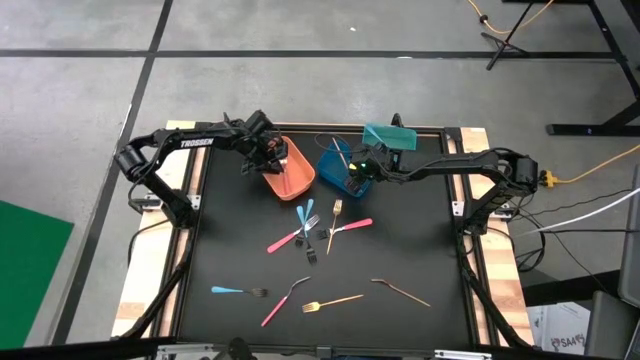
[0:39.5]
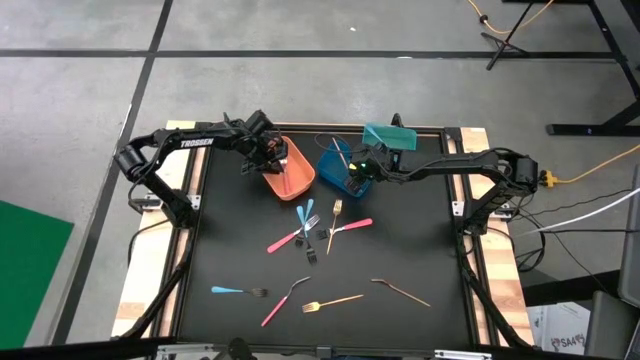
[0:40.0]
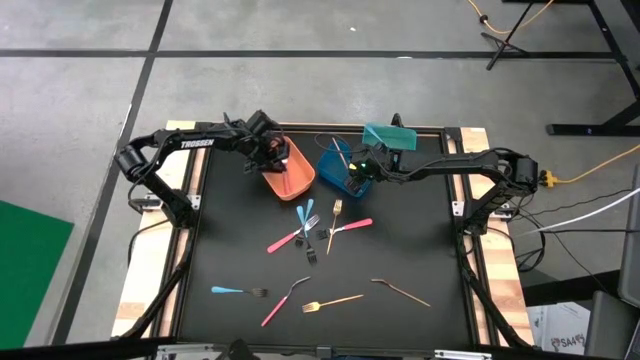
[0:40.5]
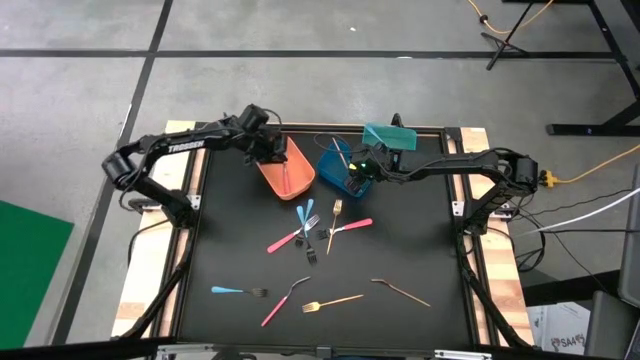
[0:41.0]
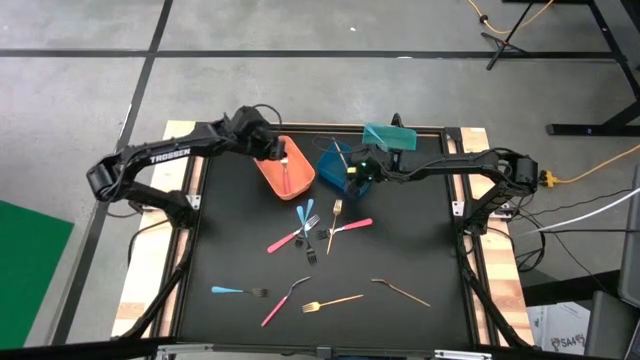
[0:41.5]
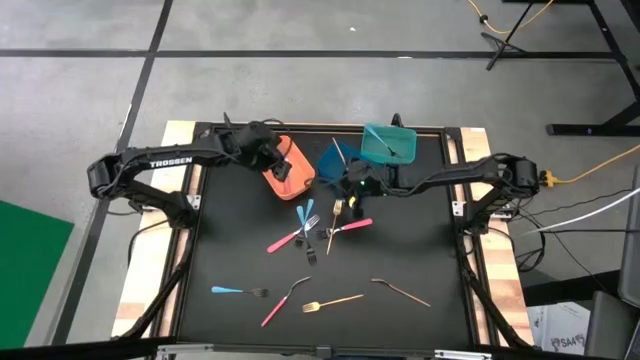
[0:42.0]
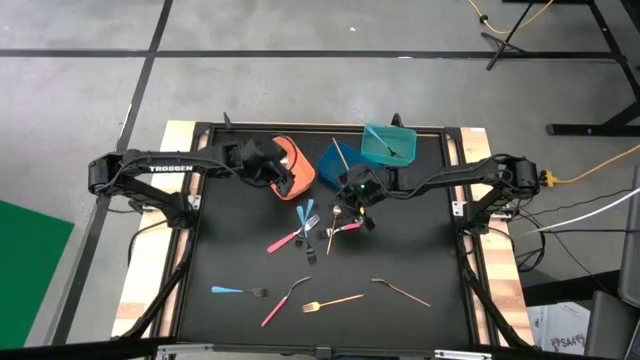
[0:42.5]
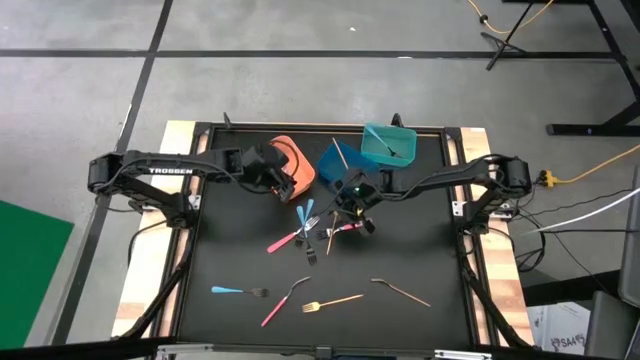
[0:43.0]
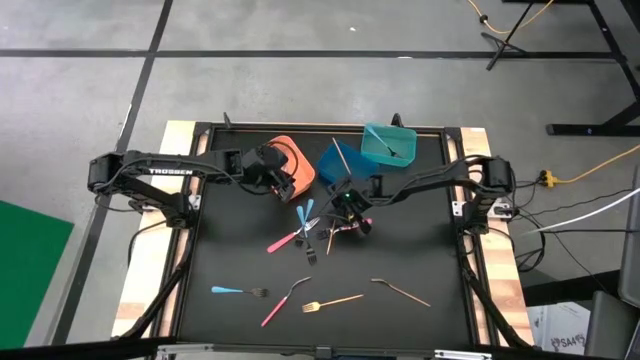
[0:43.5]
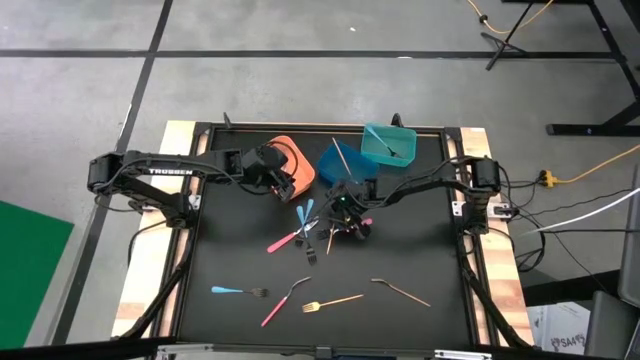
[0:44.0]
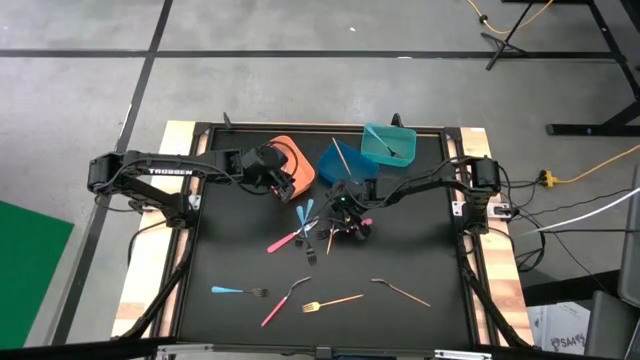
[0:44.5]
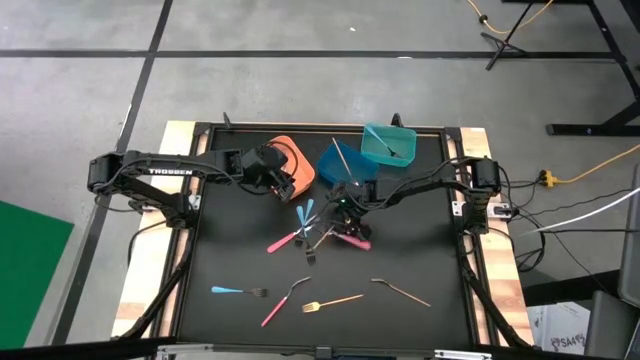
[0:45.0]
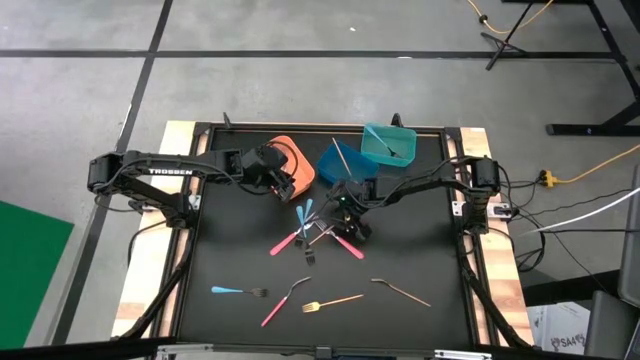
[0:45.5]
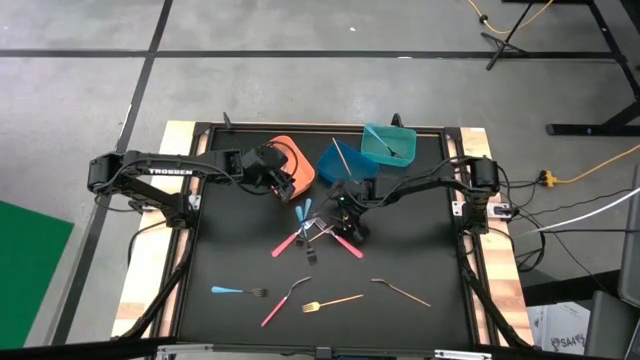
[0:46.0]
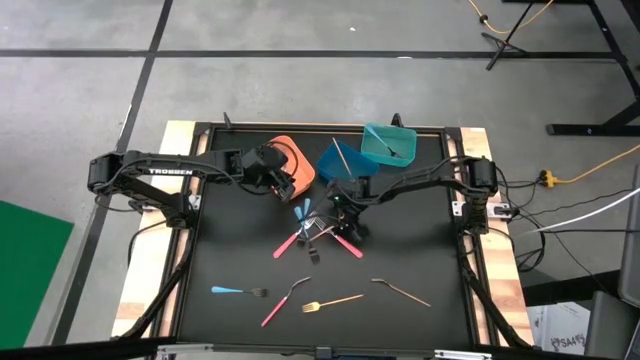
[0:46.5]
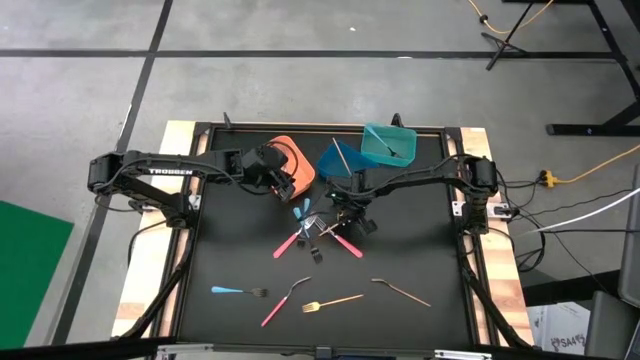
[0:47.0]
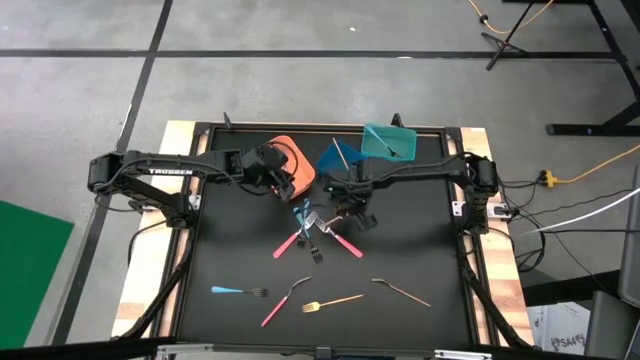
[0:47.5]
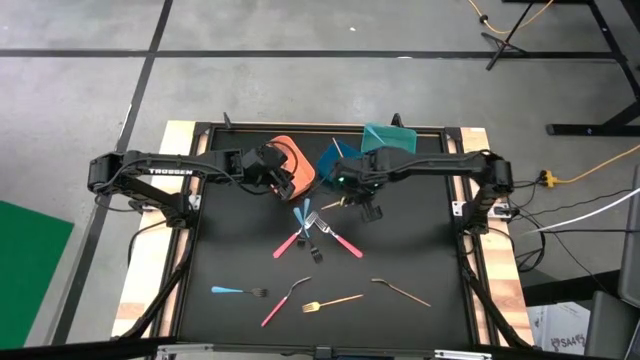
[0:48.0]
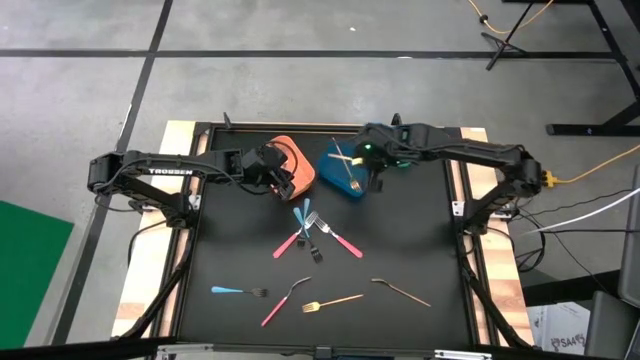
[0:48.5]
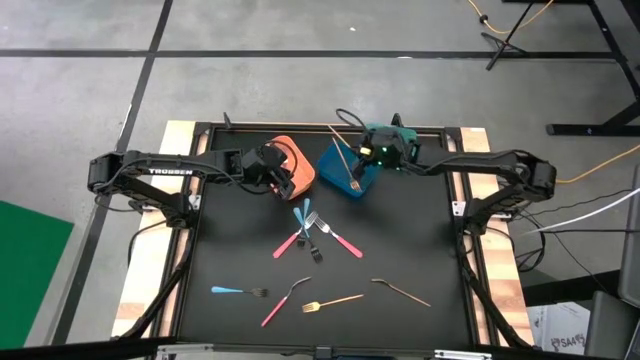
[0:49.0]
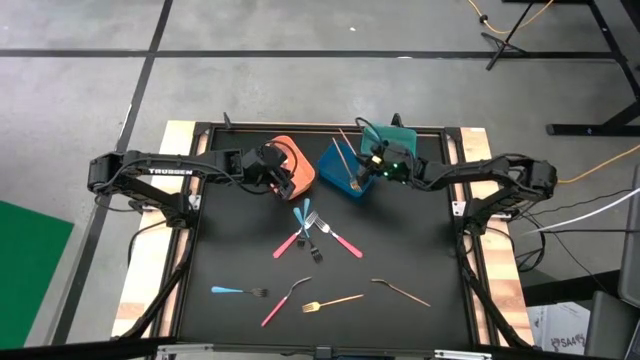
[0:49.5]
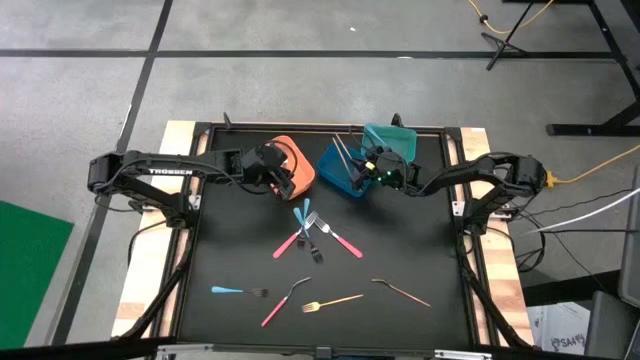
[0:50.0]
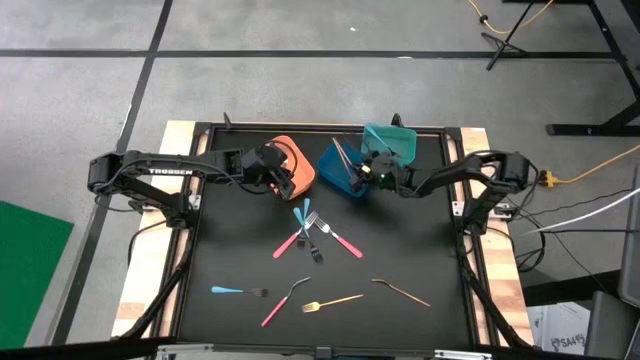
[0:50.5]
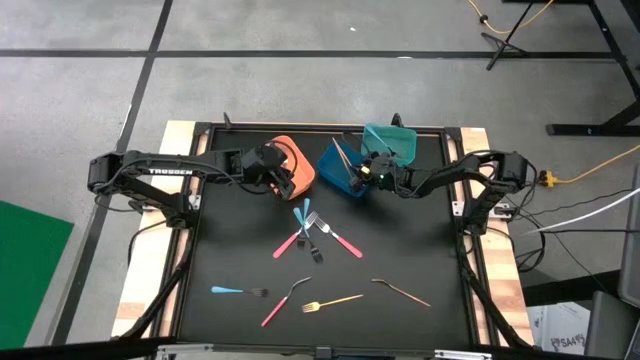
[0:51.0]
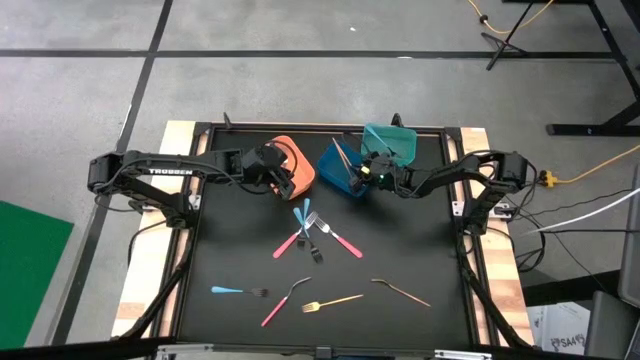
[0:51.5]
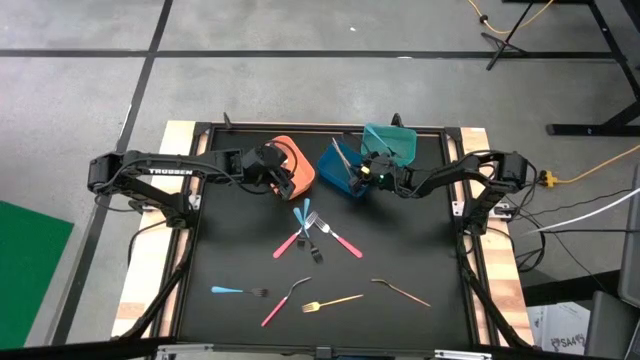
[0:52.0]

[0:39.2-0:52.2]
Task: Sort silverware by color (type)
Put the gold fork into the blue bin

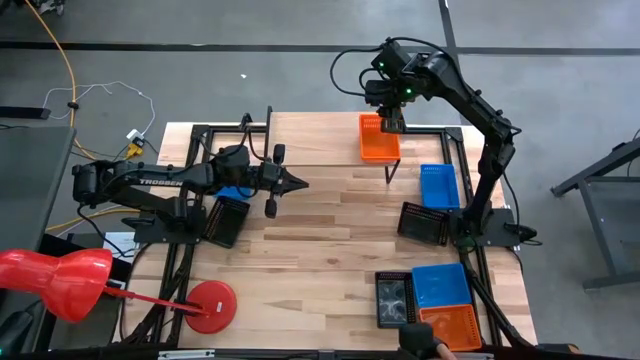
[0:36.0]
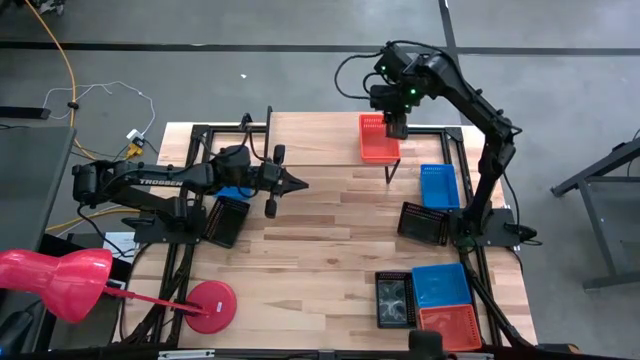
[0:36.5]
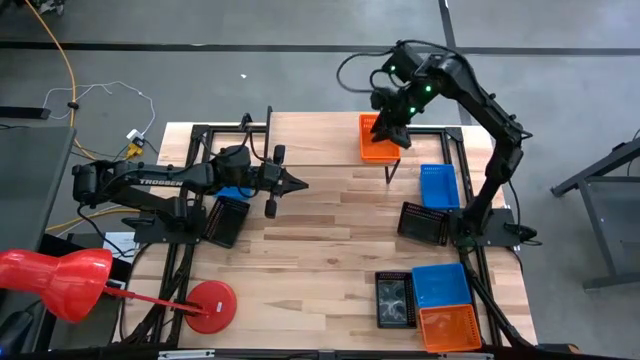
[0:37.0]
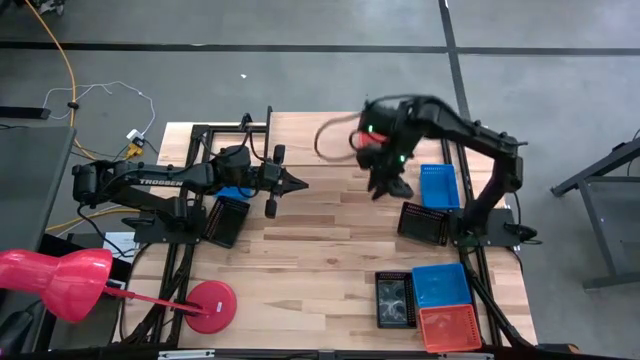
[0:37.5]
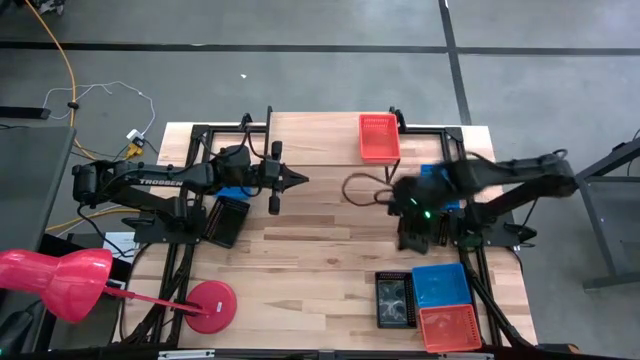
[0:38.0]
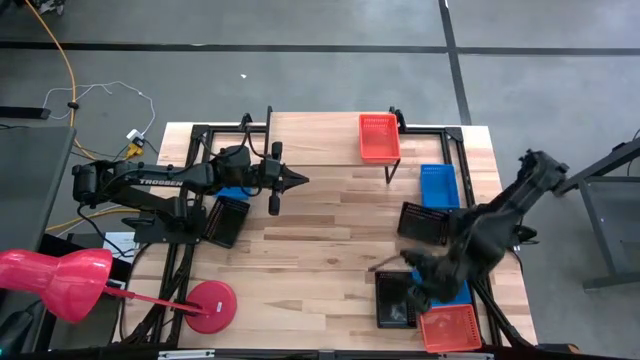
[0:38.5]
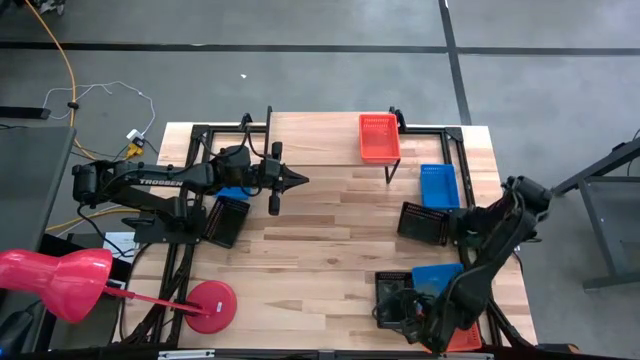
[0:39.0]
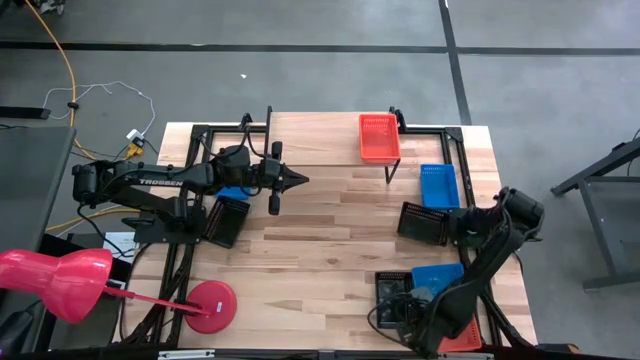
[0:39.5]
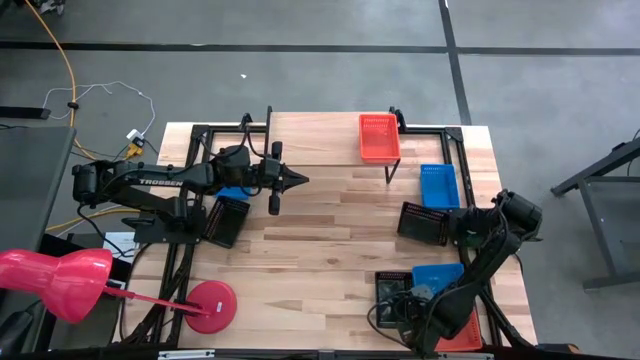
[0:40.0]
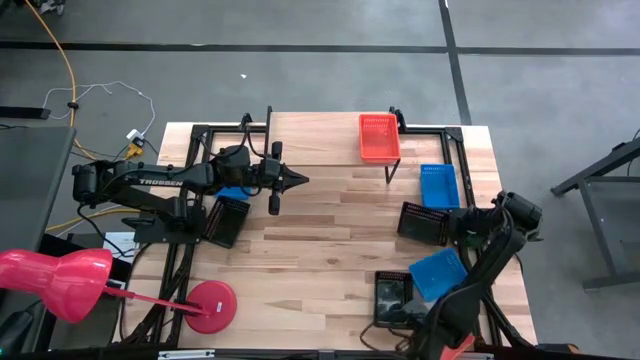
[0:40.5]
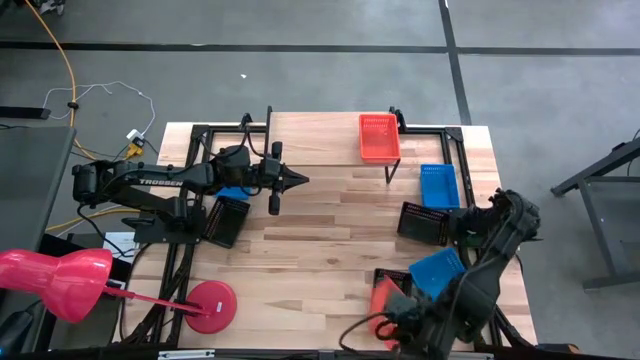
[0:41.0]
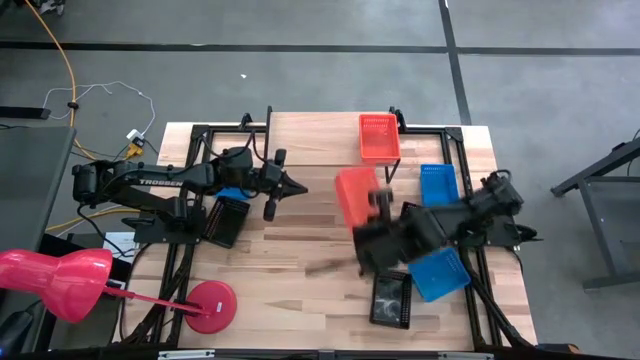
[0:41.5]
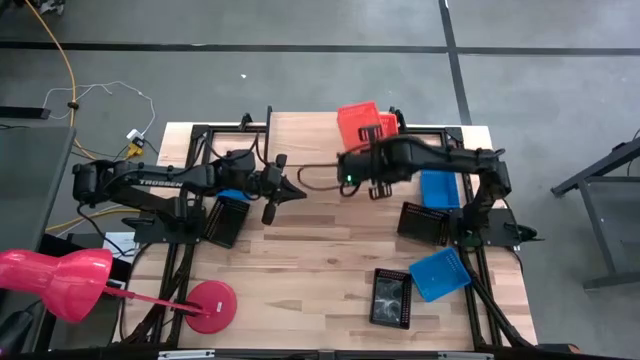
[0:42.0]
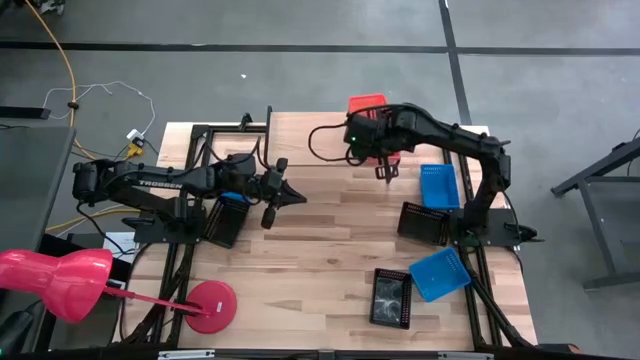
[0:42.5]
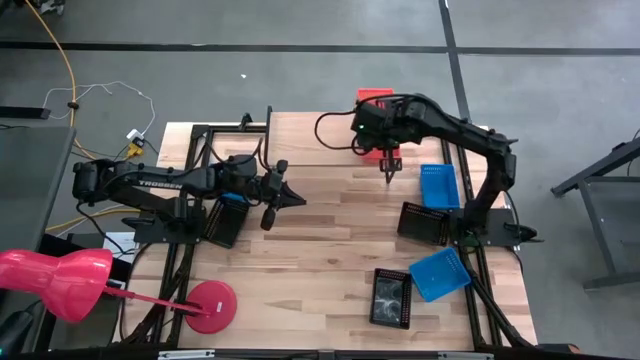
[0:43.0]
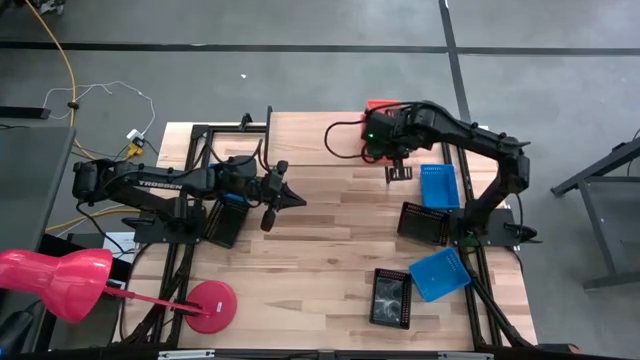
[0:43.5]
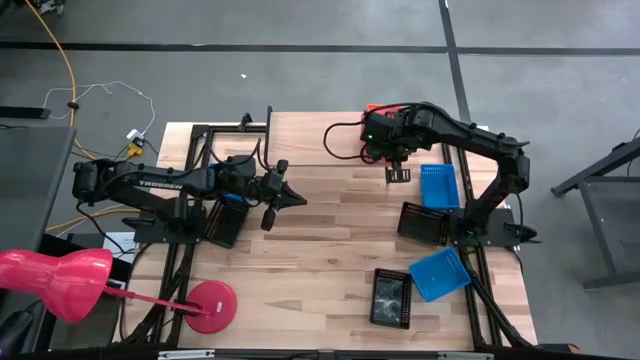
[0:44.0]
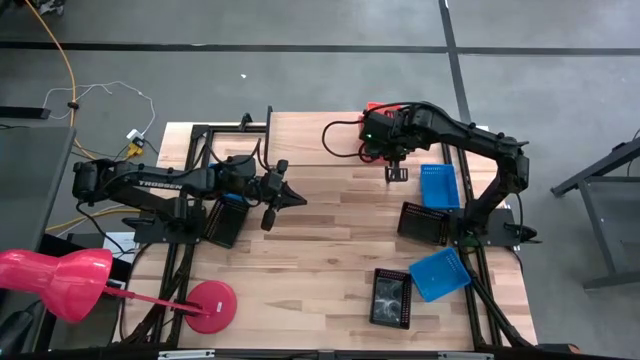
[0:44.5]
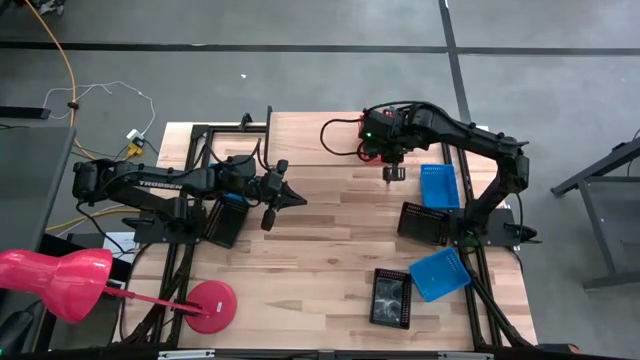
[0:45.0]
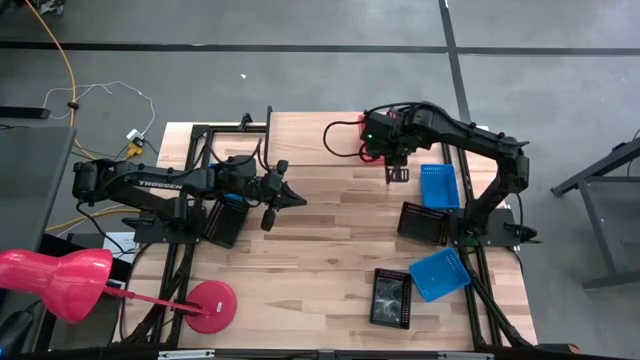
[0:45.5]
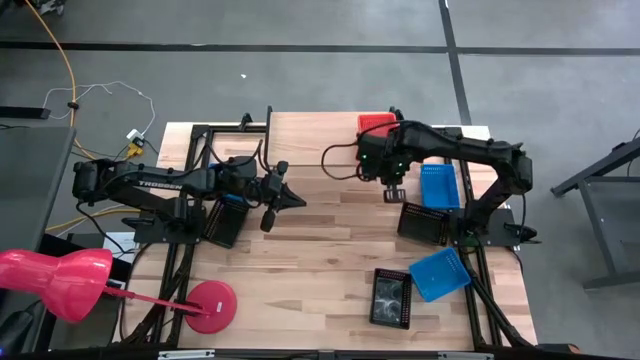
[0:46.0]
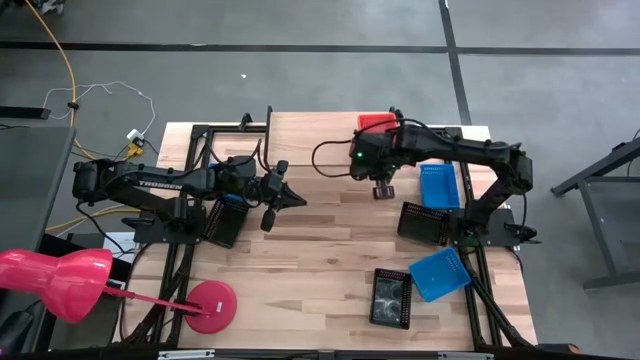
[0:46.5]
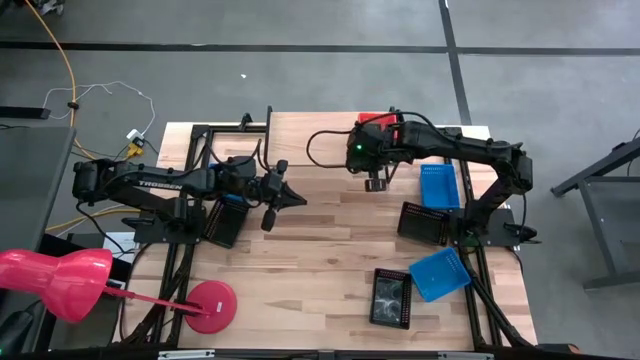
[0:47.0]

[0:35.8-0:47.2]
Task: Stack baskets on shelf by color
Stack the orange basket on the other orange baskets on the shelf
